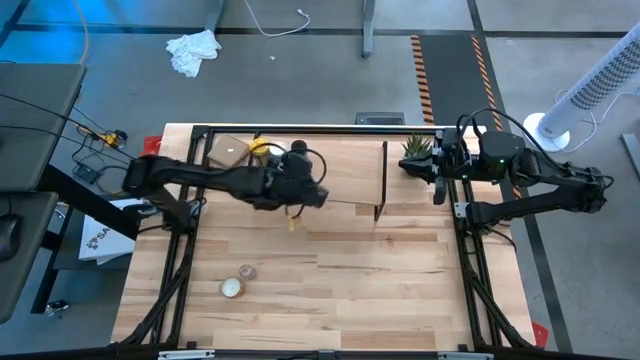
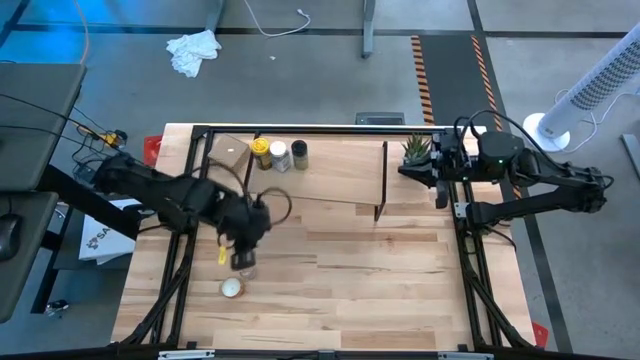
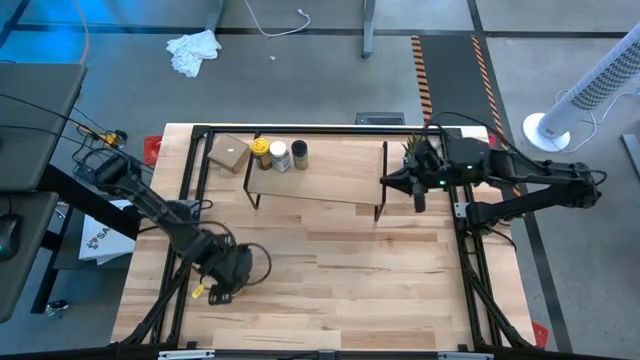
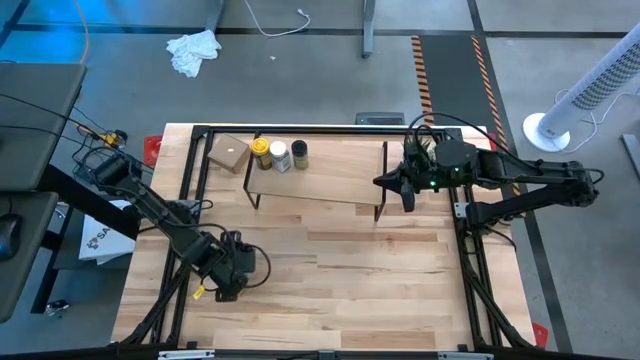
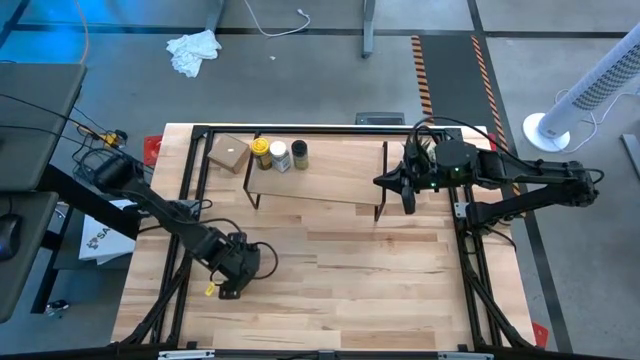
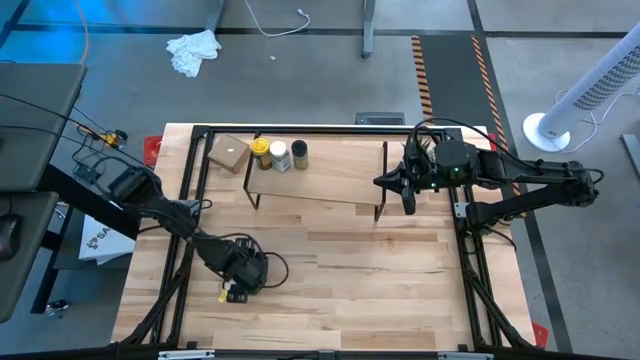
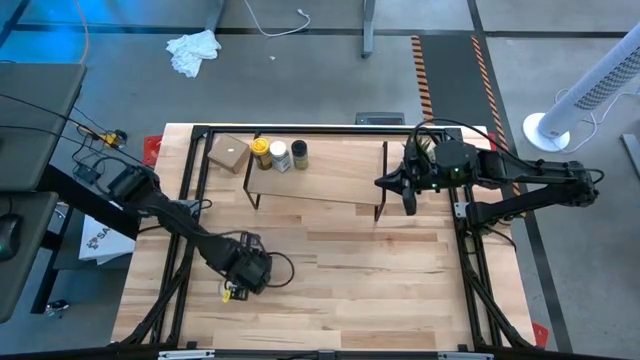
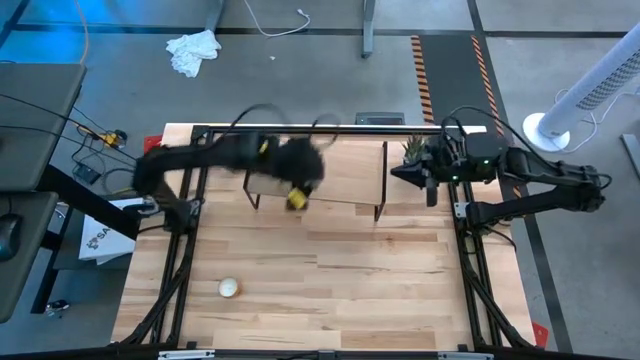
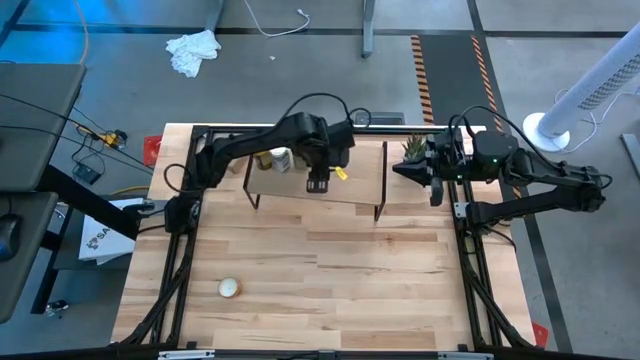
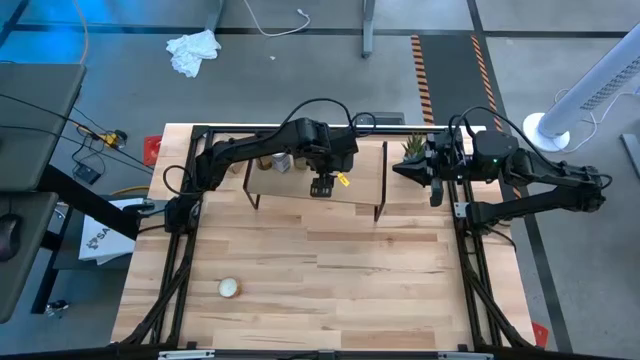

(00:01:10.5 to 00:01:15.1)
Task: Shelf spices
Put the brown seasoning bottle on the shelf

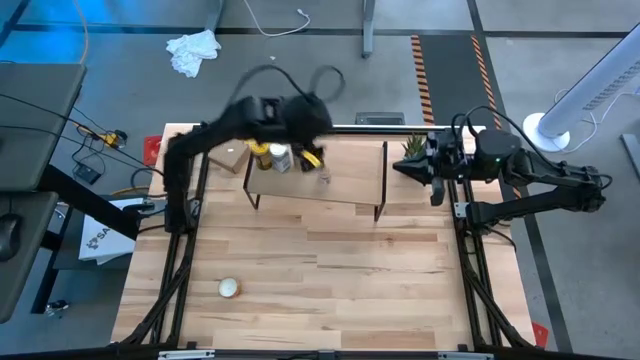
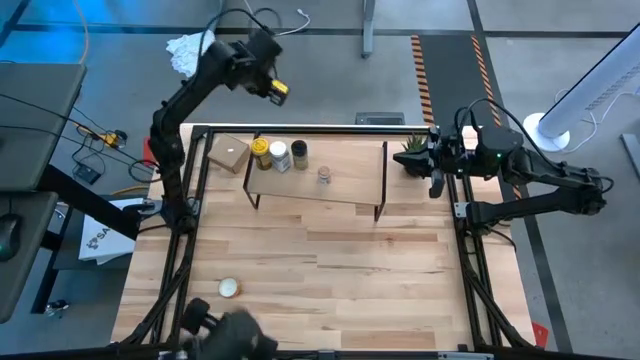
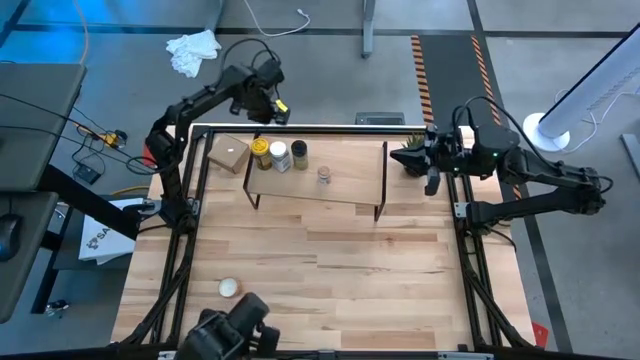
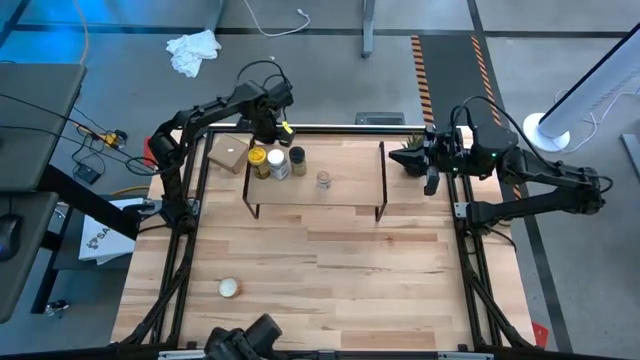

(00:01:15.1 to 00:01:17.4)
Adjust the shelf

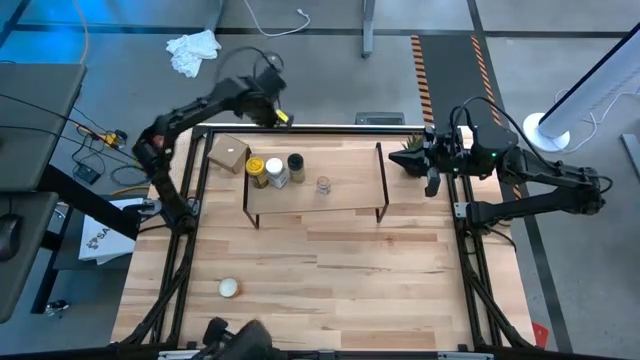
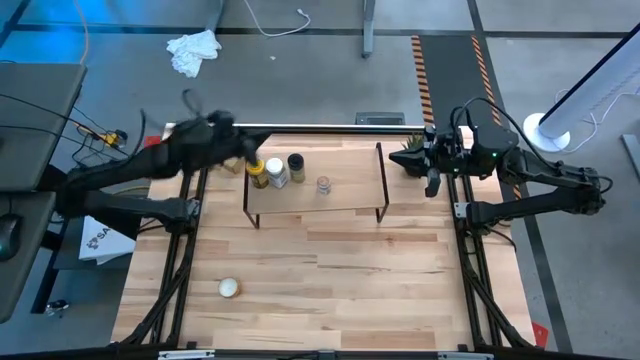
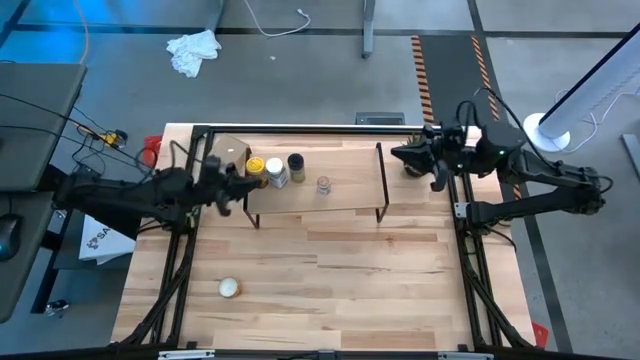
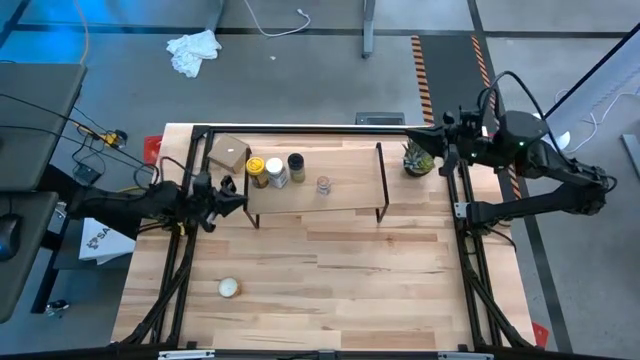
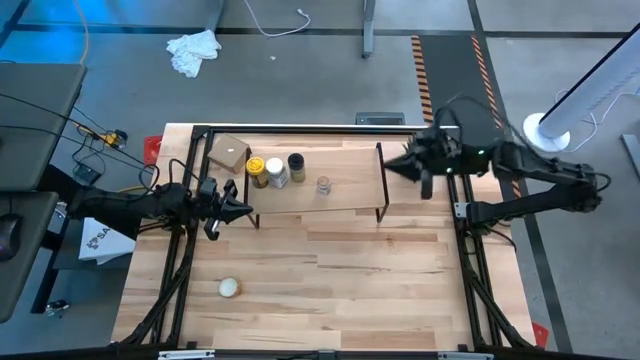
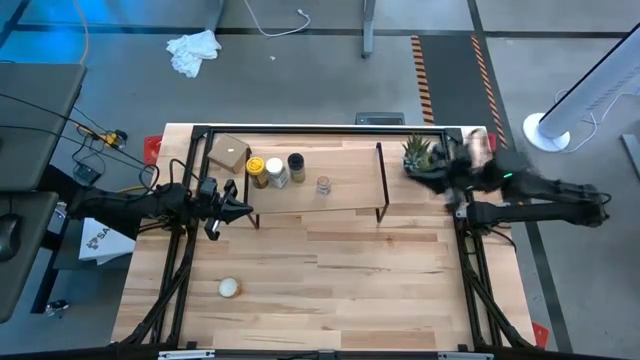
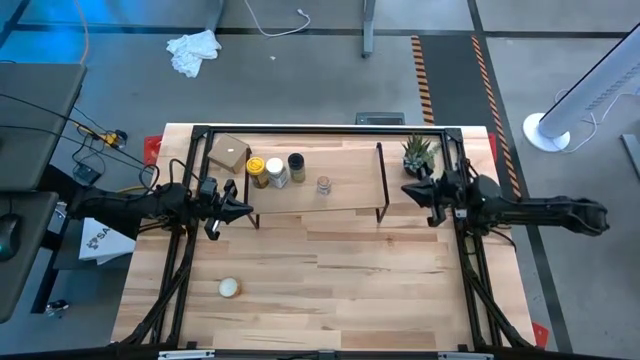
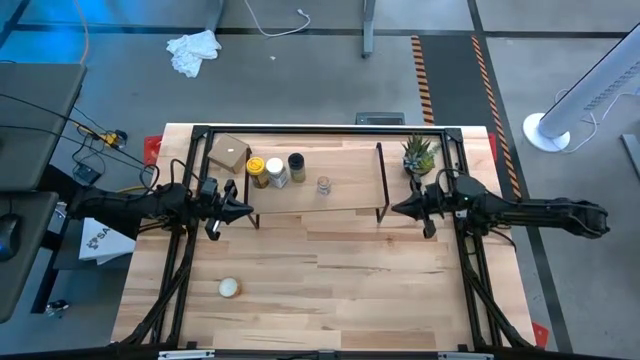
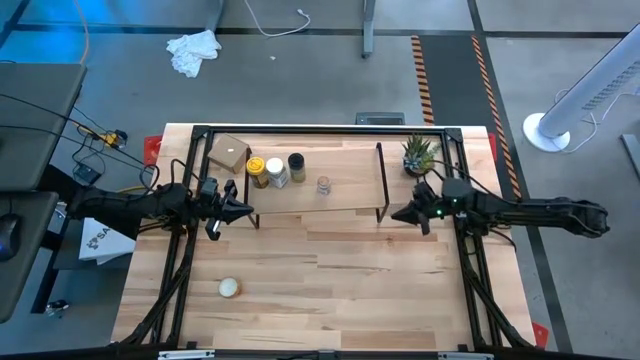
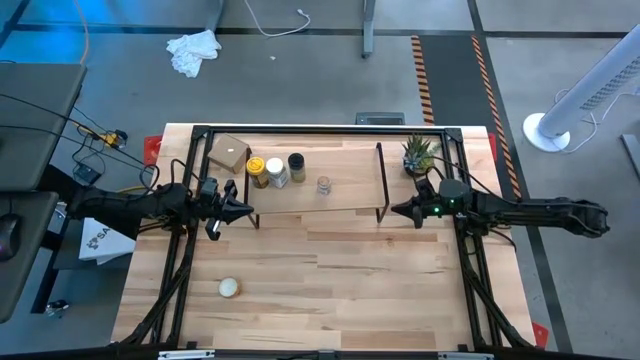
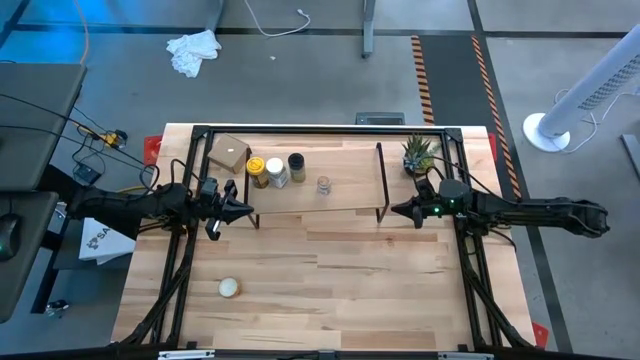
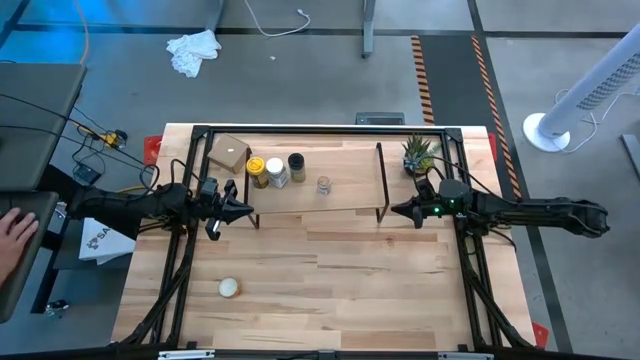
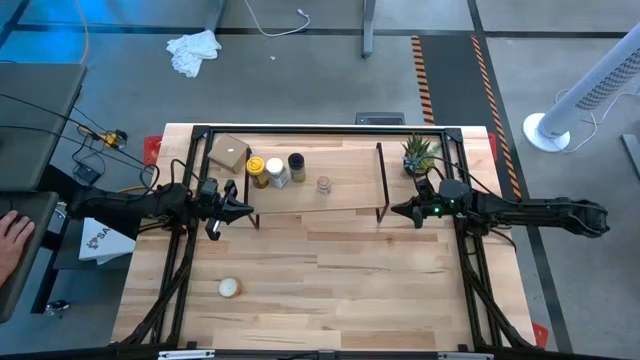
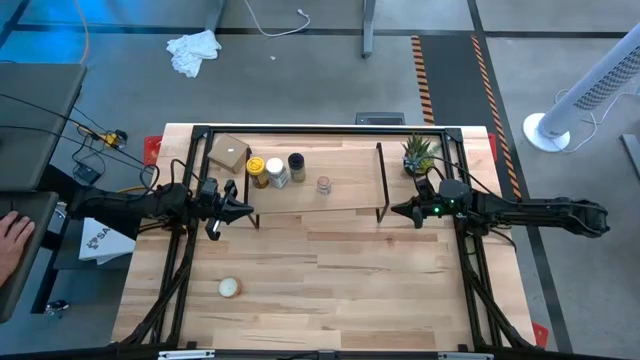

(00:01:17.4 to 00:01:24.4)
Return to Home Position

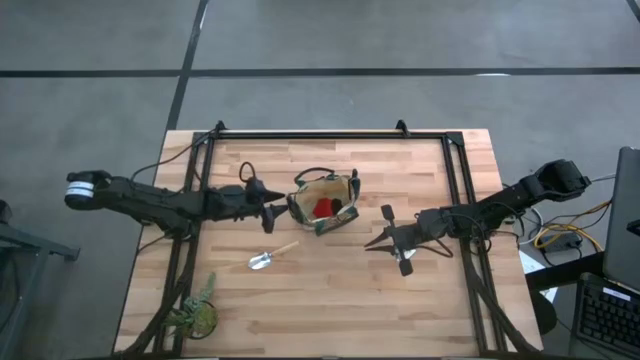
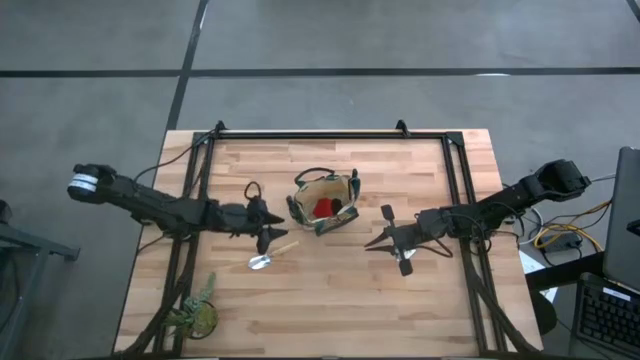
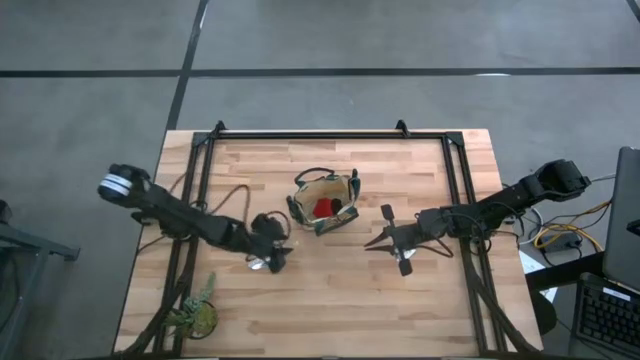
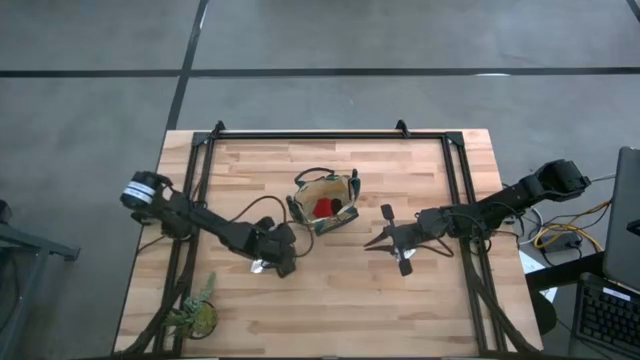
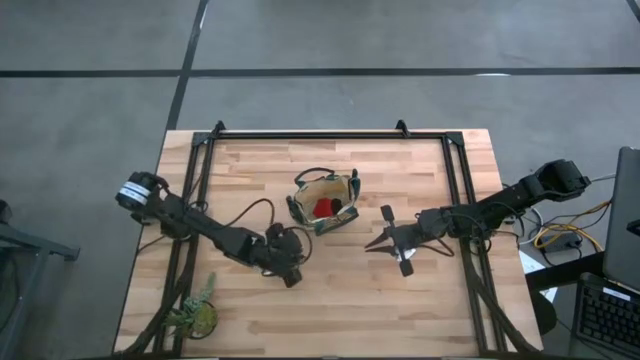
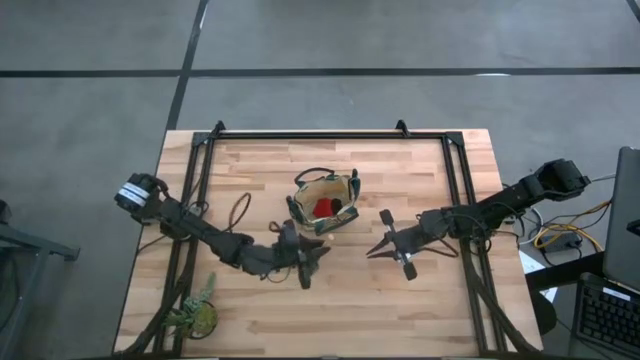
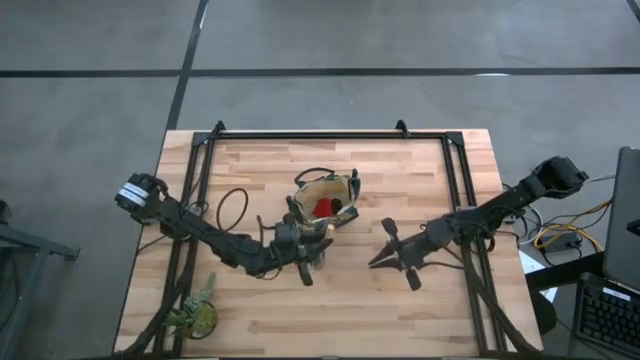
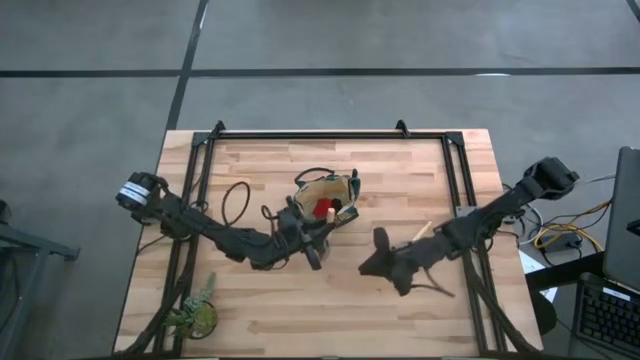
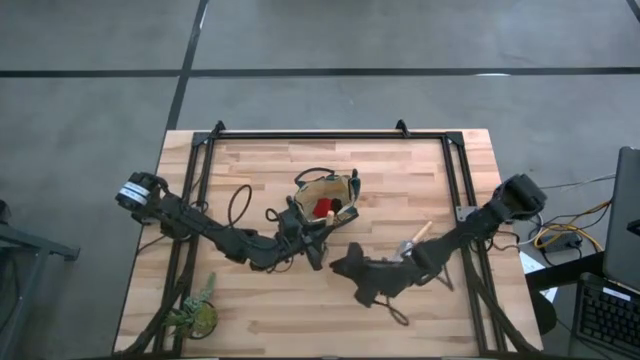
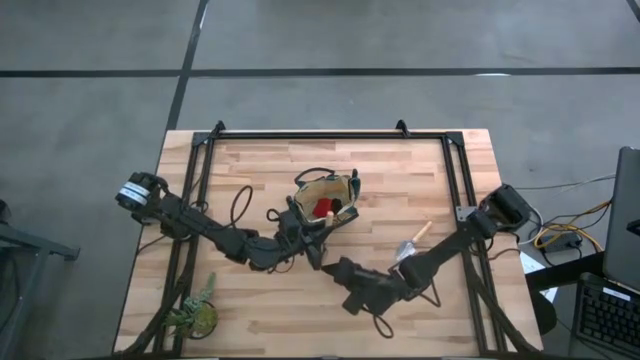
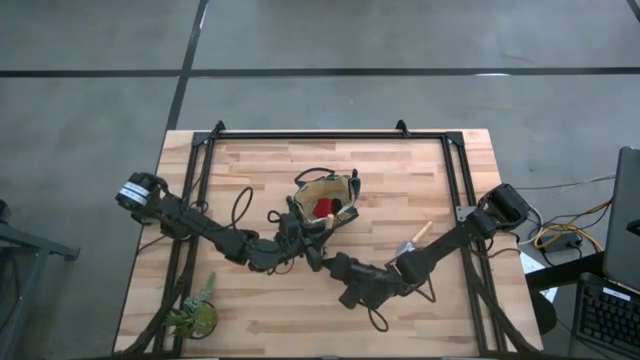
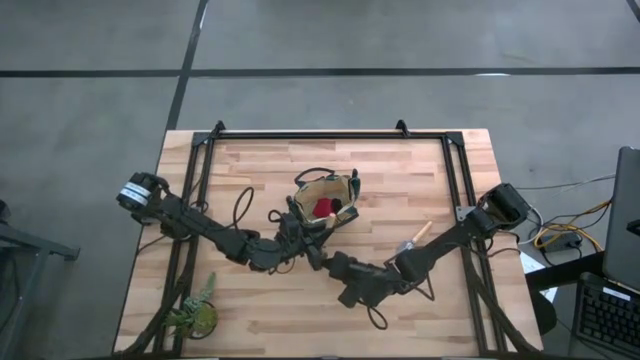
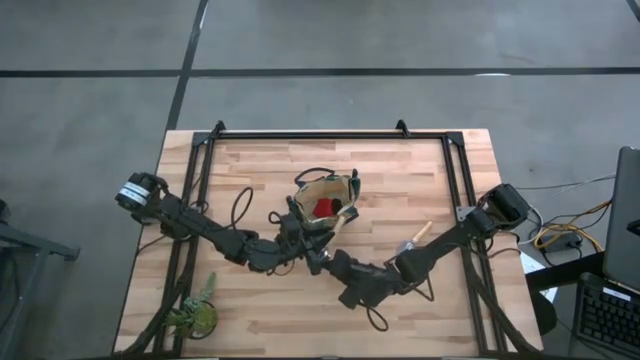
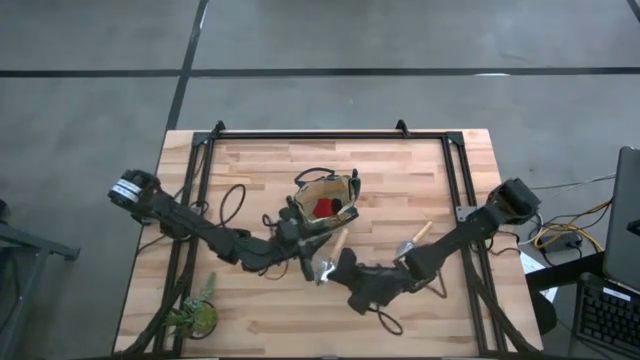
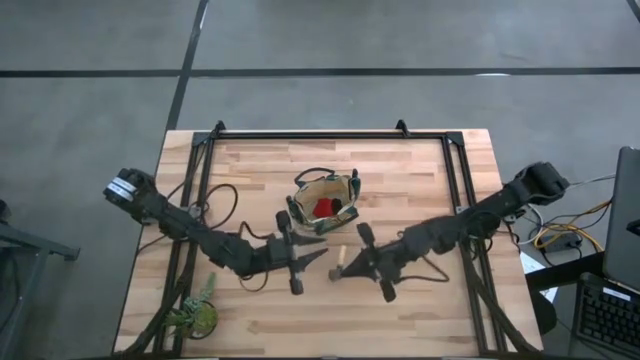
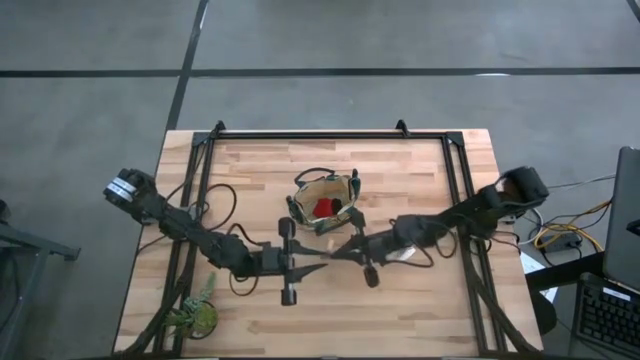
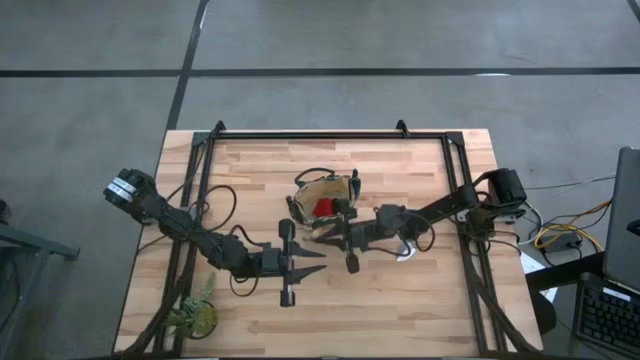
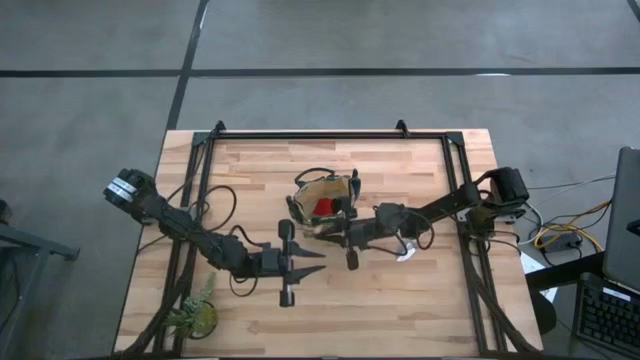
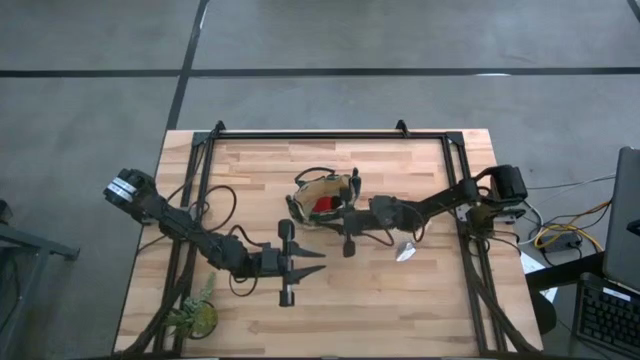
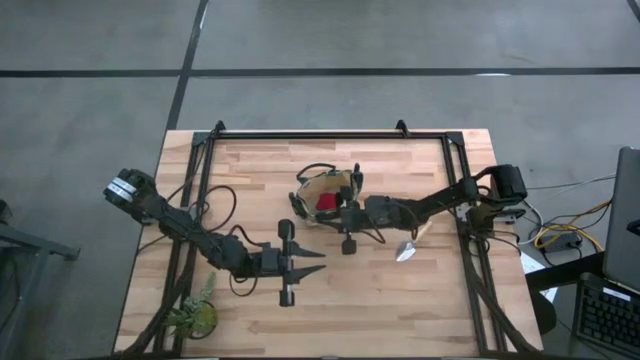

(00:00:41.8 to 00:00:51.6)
Task: Pick & Place Garden tools in Gardening bag
Put the left brown trowel into the gardening bag
